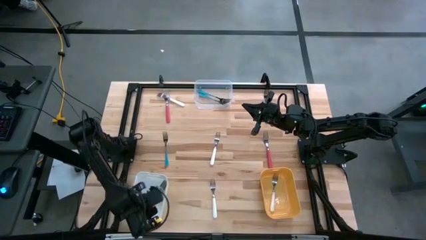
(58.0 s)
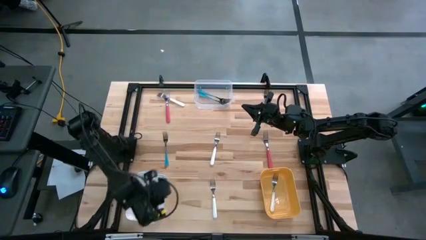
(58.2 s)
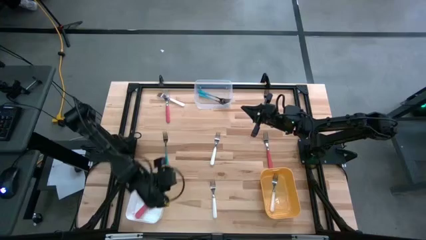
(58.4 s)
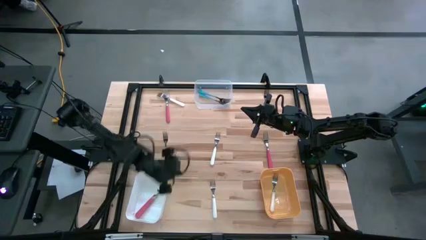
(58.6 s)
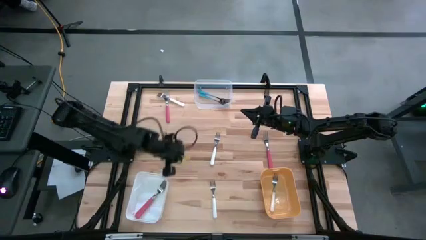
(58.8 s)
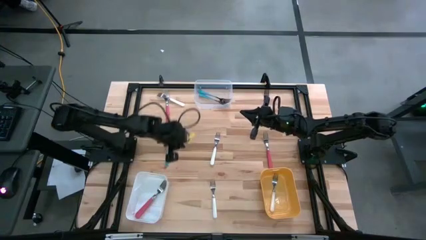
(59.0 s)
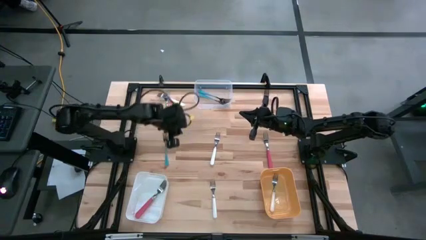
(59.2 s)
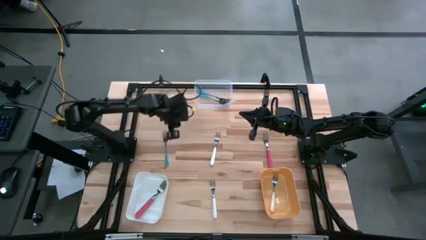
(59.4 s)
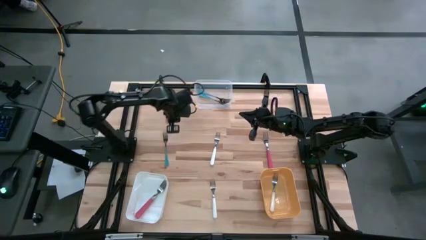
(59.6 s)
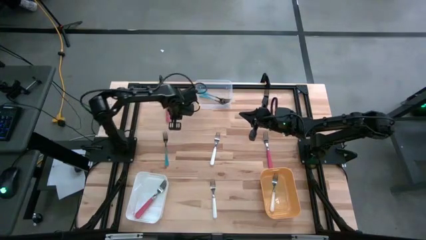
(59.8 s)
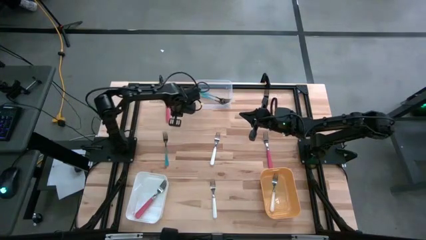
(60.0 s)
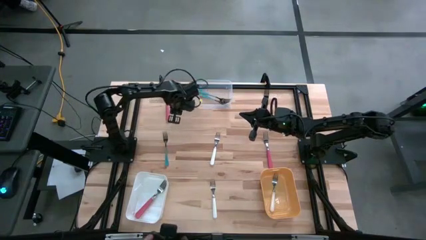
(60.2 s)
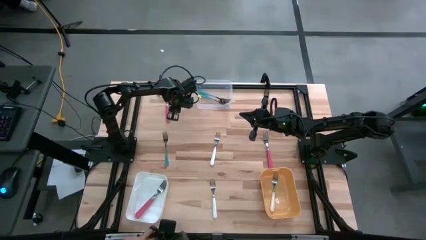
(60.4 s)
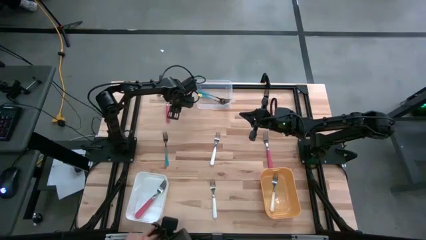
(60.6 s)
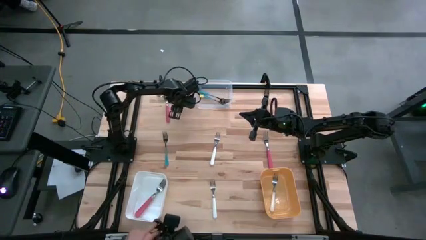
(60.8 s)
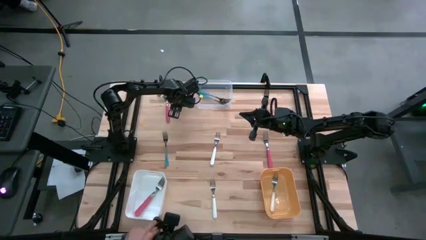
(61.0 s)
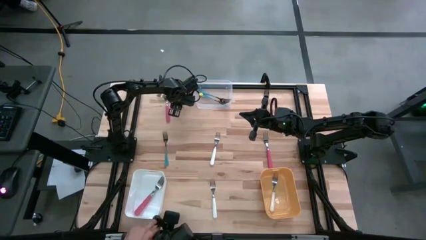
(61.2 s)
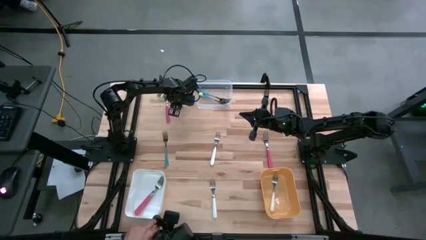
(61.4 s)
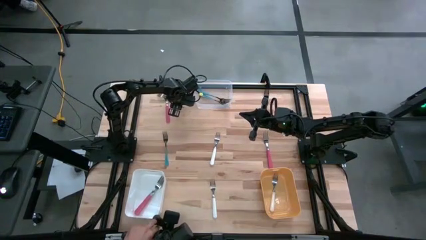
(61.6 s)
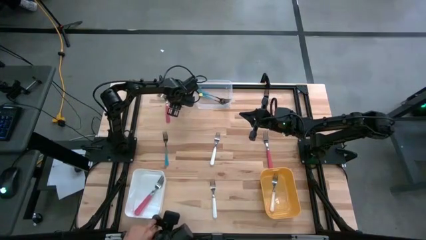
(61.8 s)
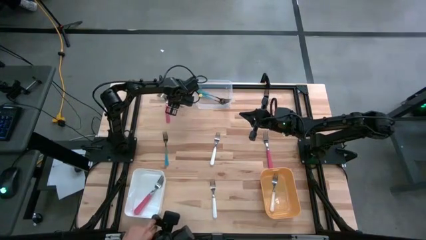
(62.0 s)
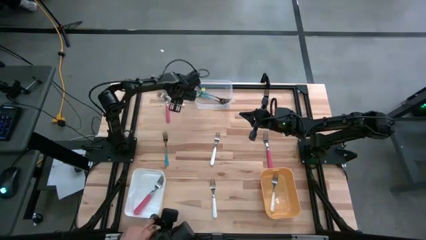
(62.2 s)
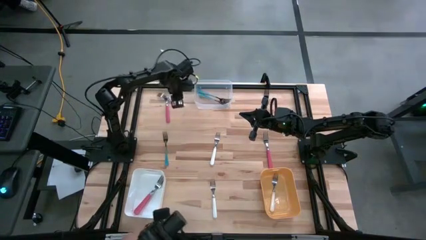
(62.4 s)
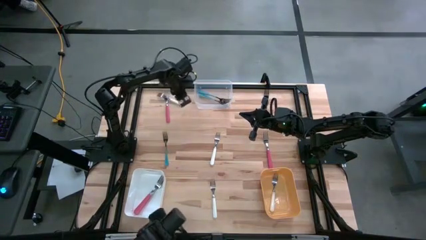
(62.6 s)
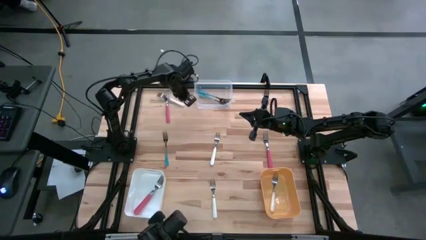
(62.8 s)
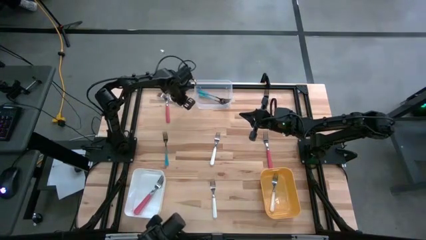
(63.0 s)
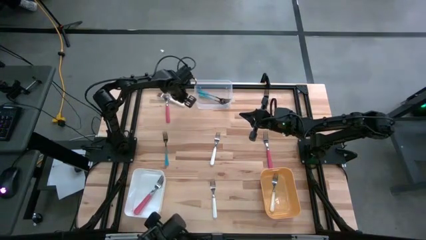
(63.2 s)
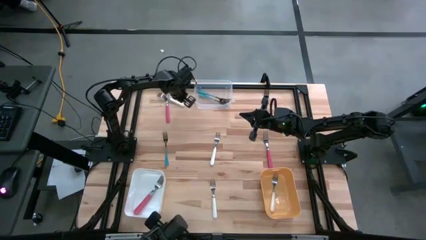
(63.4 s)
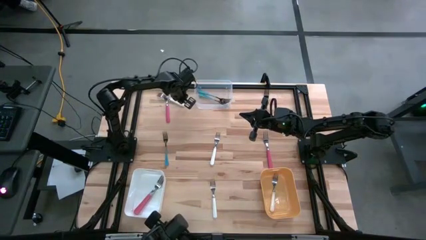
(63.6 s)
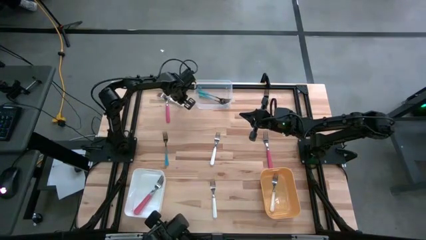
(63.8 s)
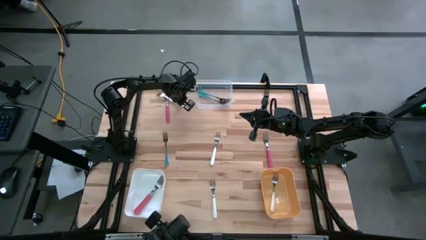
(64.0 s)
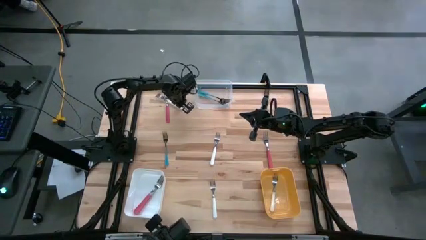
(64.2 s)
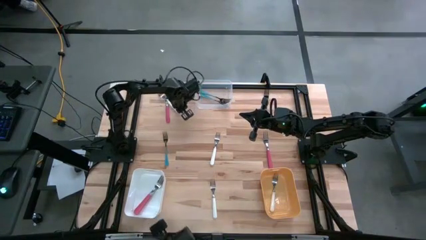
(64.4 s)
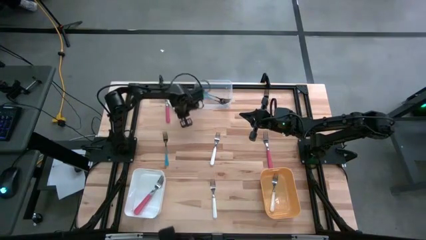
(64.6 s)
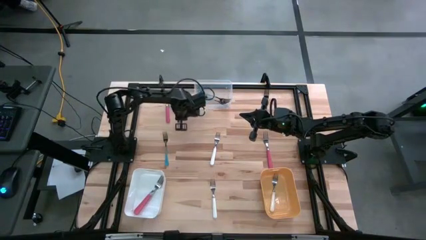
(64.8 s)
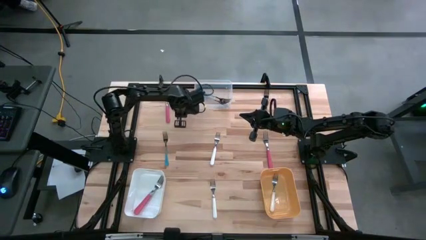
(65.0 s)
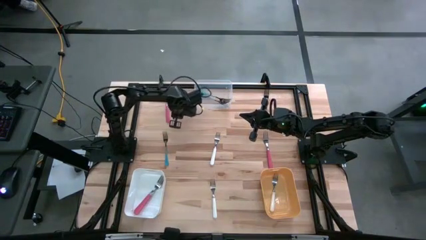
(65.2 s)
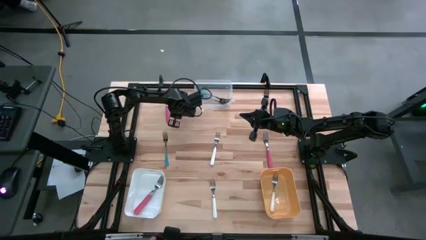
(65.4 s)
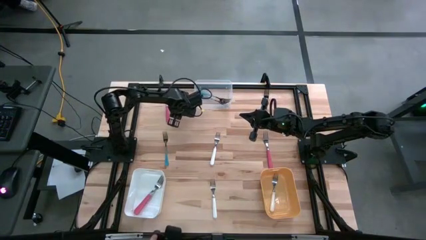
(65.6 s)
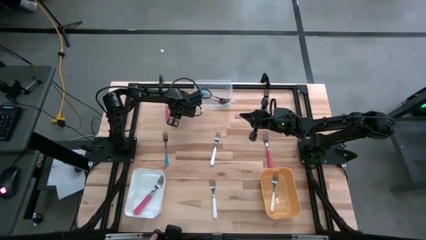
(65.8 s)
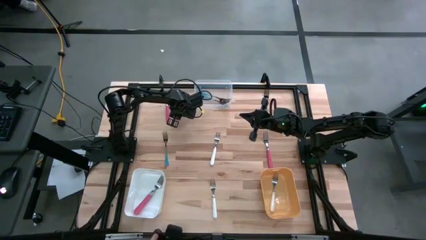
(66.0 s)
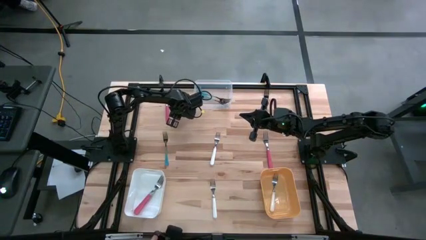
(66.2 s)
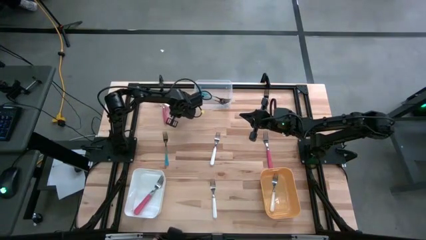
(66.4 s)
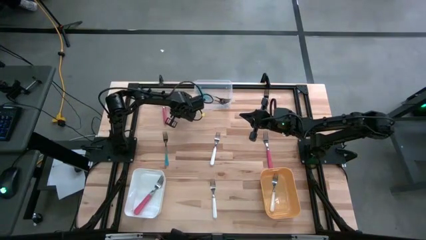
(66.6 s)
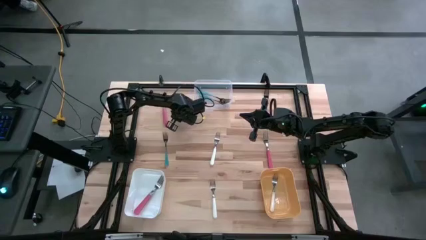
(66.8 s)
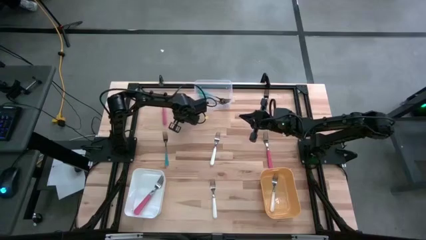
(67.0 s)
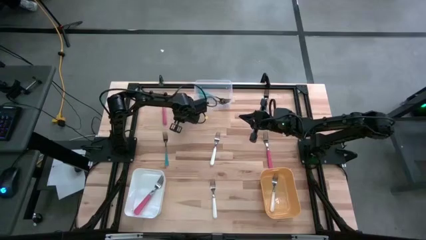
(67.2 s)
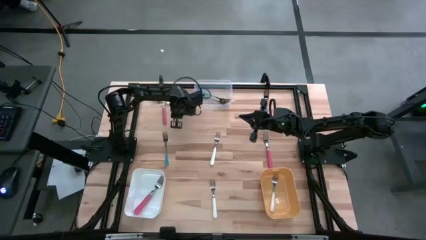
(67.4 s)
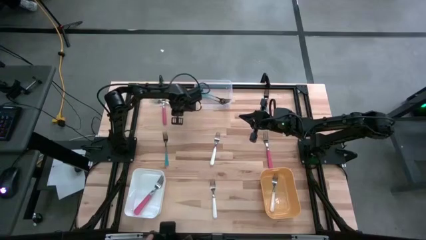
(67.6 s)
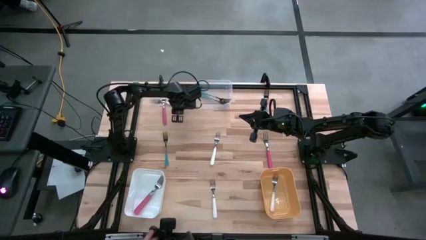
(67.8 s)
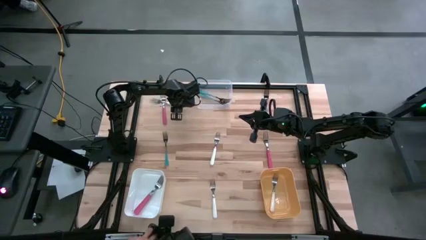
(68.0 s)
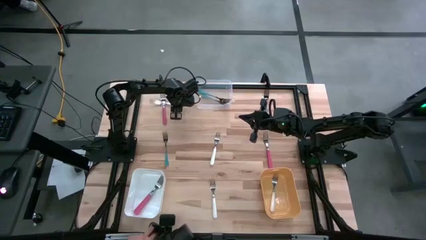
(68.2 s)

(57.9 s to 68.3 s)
Task: Sort silverware by color (type)
Put the white fork into the yellow bin

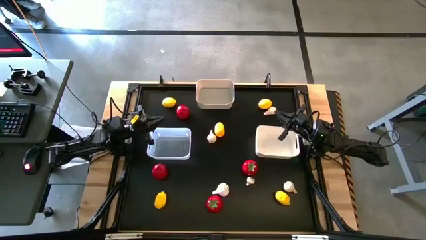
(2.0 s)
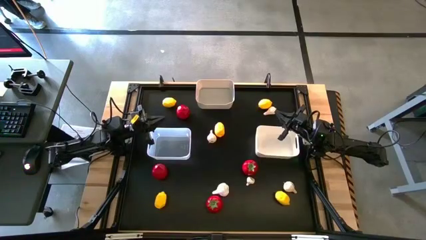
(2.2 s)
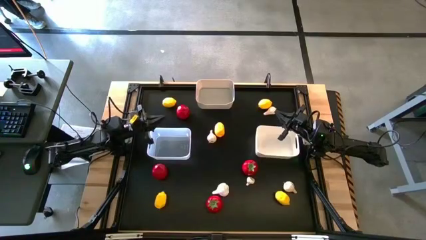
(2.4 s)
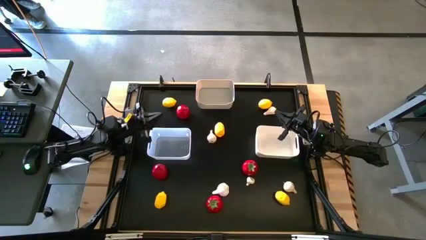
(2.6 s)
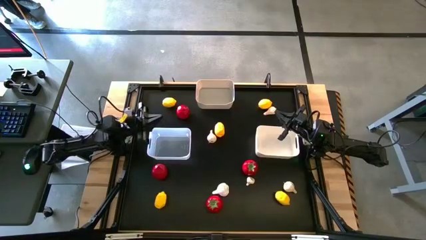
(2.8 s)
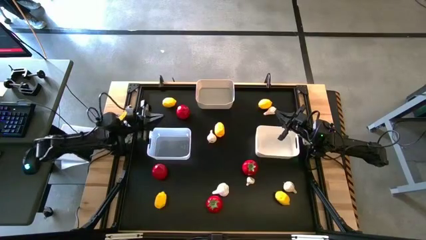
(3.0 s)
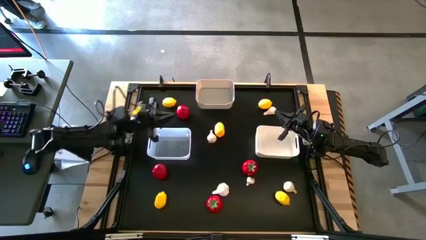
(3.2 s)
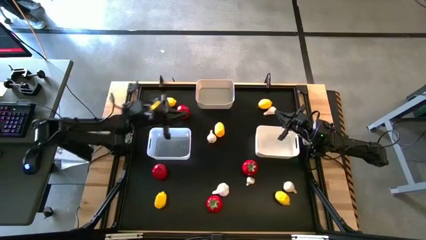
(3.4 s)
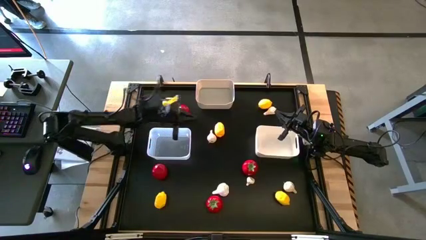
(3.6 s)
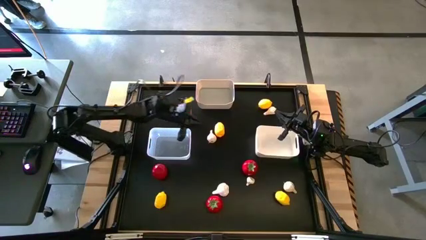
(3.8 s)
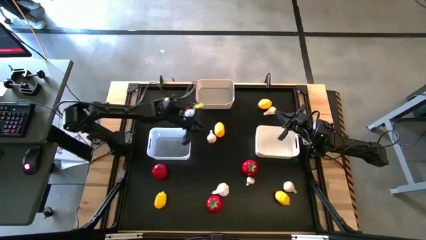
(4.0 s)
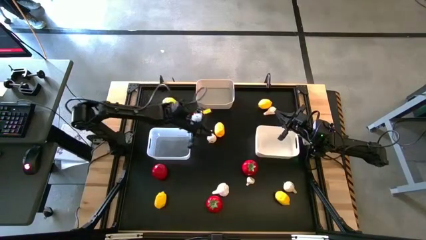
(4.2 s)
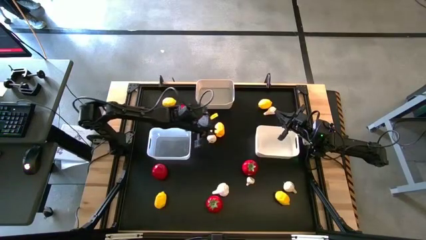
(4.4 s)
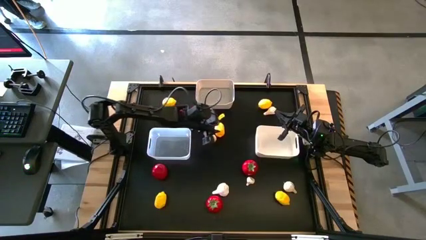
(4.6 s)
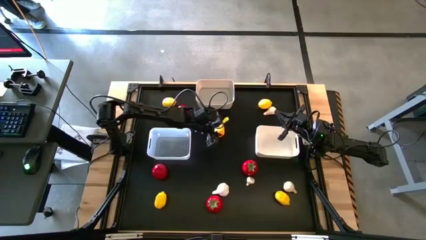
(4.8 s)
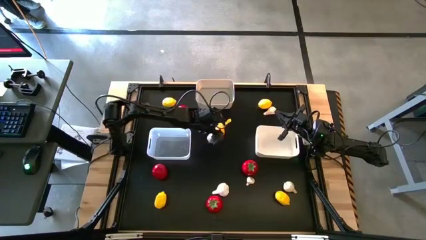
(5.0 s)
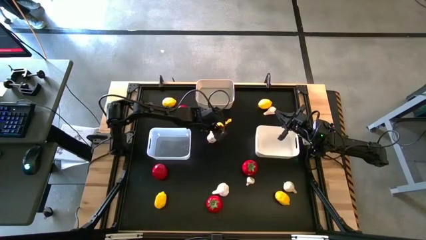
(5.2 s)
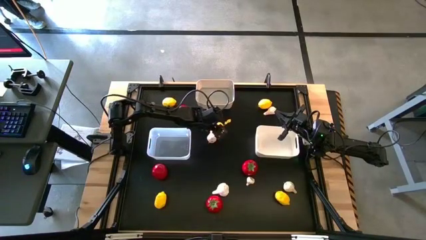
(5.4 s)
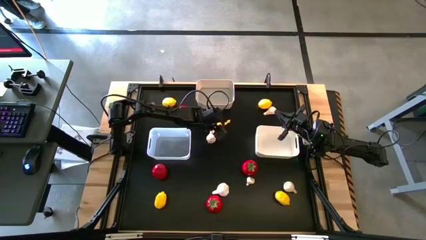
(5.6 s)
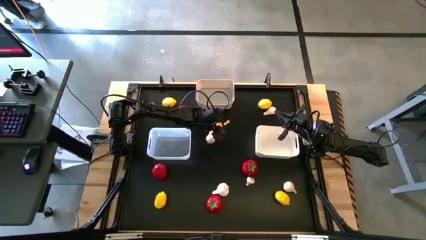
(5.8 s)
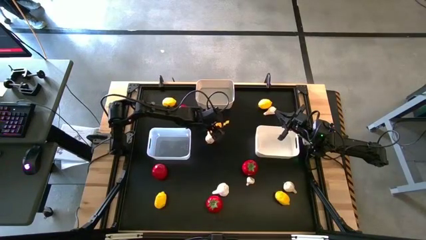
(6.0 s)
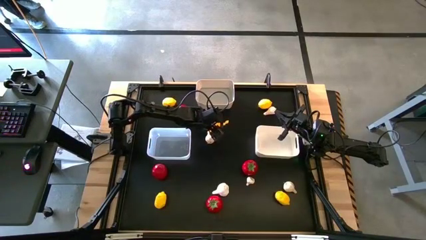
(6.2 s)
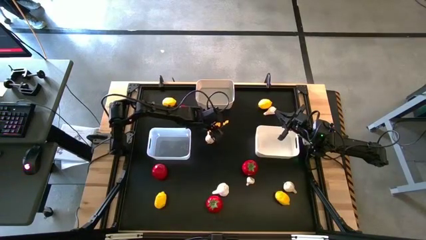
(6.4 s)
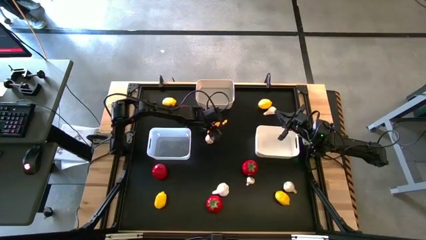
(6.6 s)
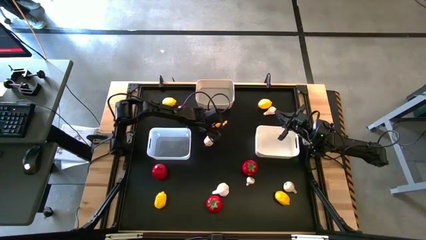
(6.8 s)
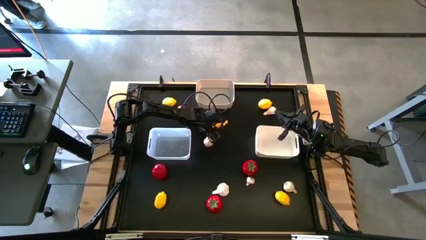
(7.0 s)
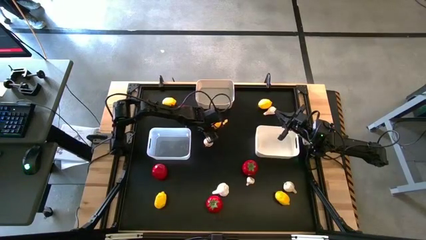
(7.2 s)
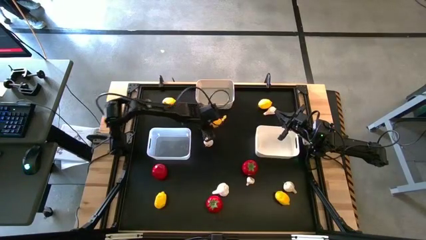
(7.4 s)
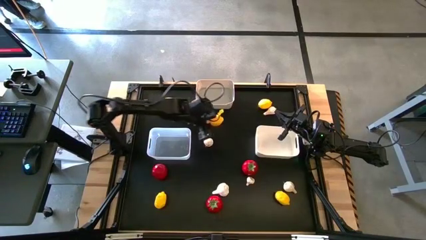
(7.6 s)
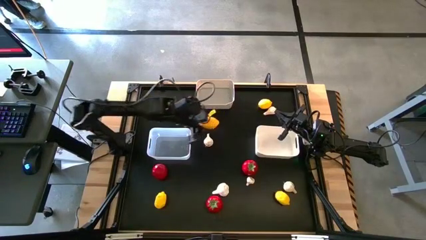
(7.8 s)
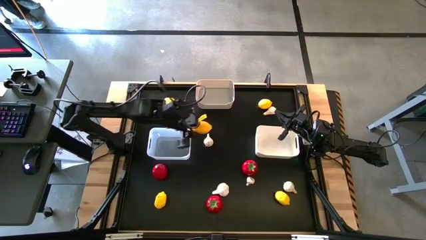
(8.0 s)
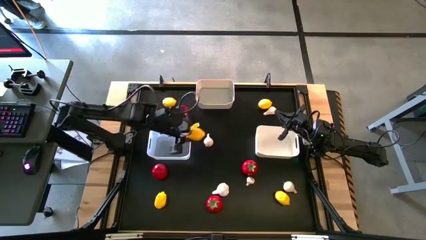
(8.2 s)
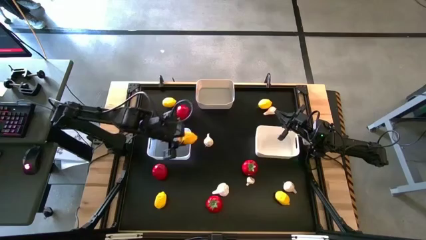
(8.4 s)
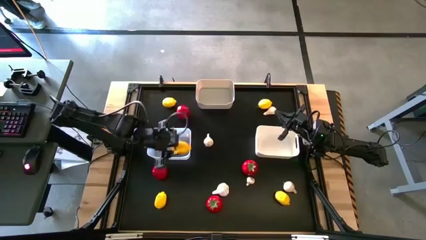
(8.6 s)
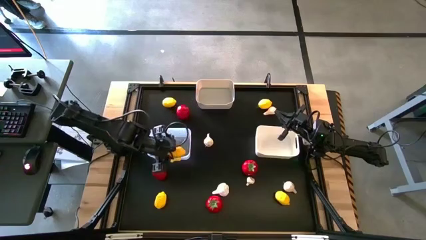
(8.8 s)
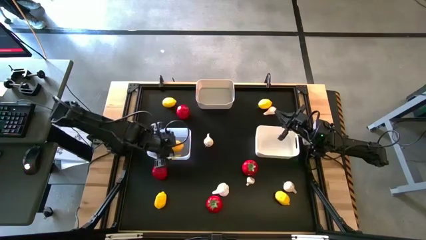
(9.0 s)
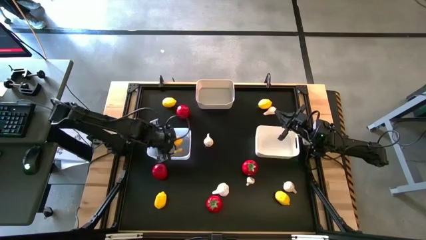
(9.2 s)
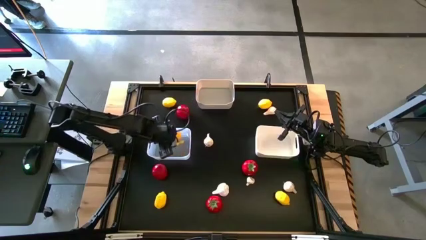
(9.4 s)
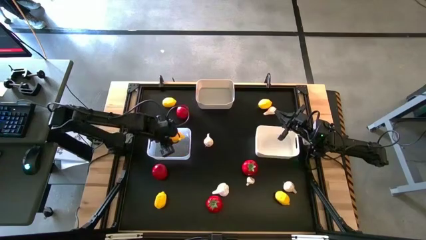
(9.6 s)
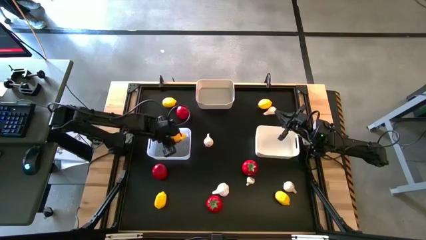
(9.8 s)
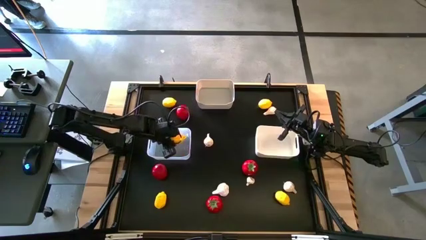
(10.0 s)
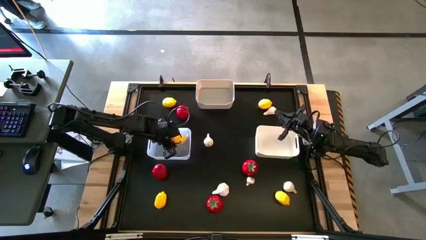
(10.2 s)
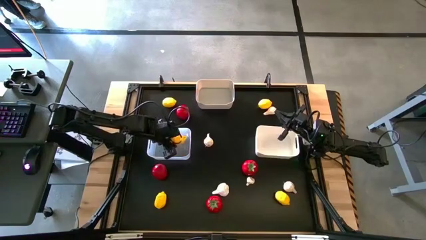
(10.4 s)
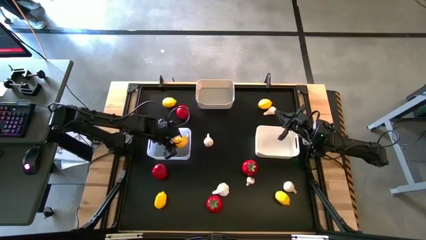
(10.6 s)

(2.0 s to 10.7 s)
Task: Sort produce into baskets
Put the yellow lemon into the transparent bin
